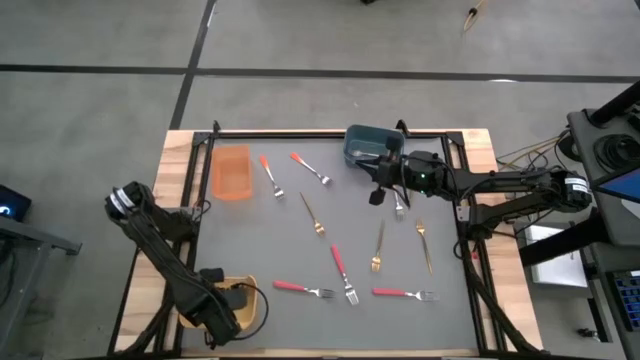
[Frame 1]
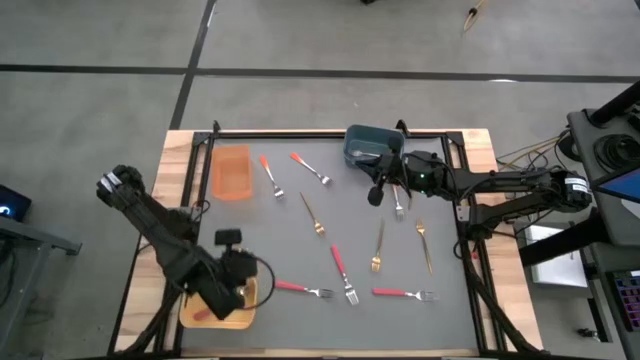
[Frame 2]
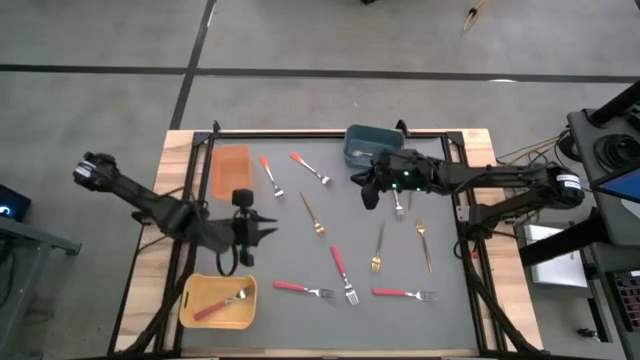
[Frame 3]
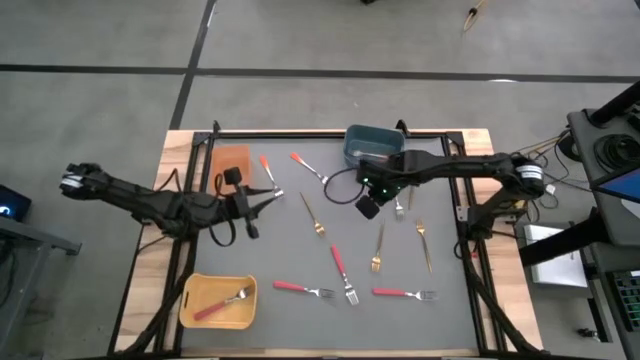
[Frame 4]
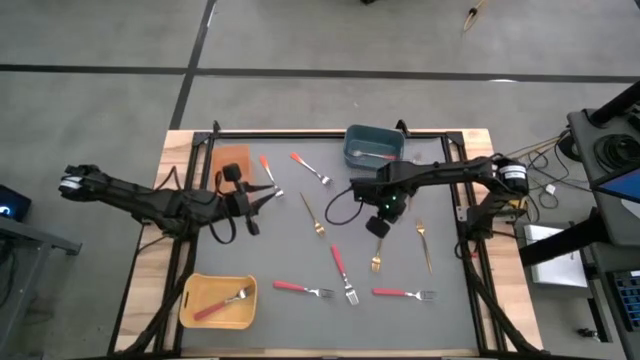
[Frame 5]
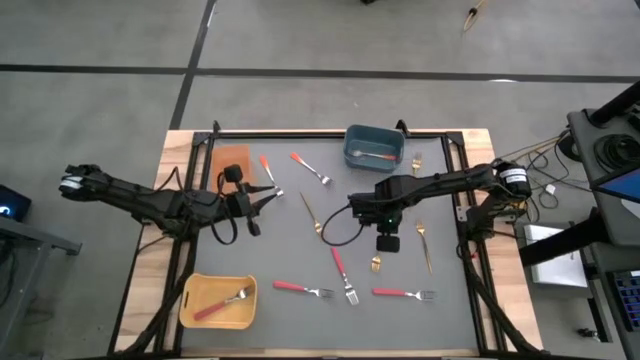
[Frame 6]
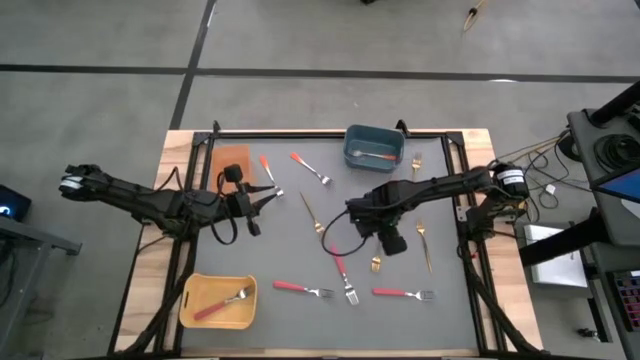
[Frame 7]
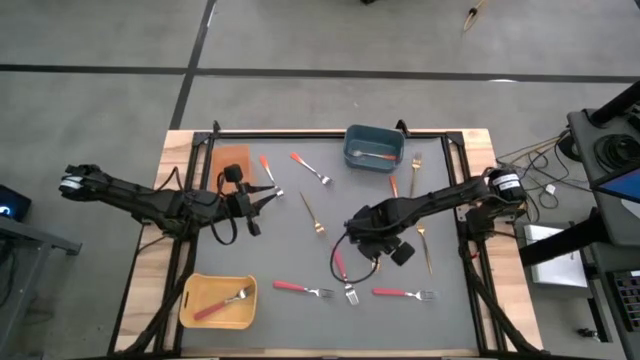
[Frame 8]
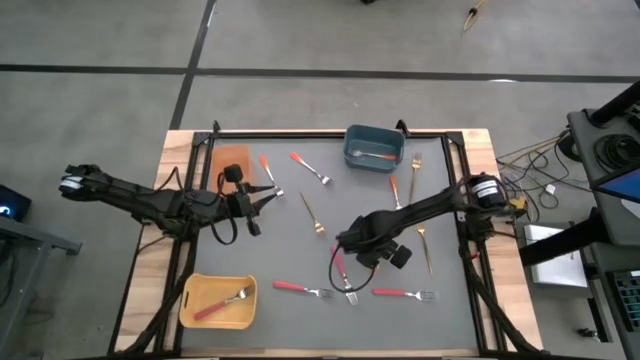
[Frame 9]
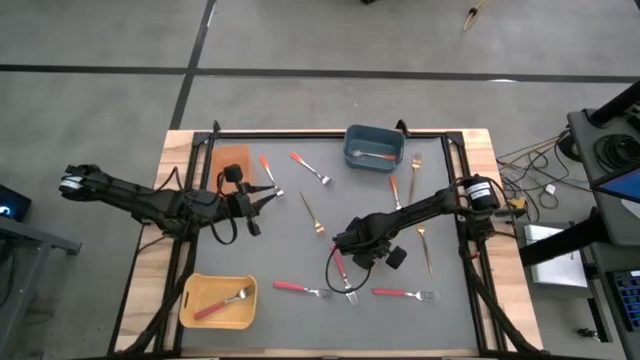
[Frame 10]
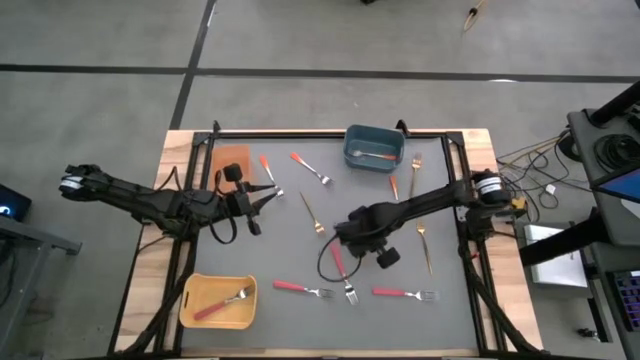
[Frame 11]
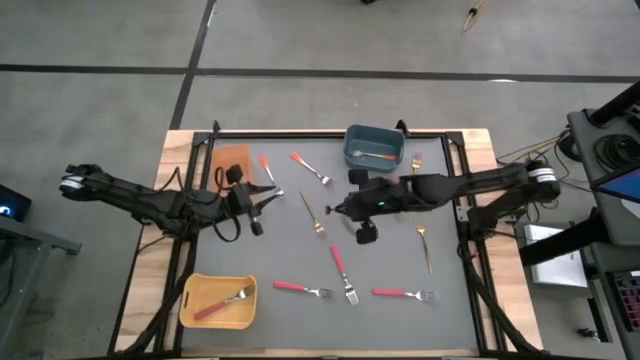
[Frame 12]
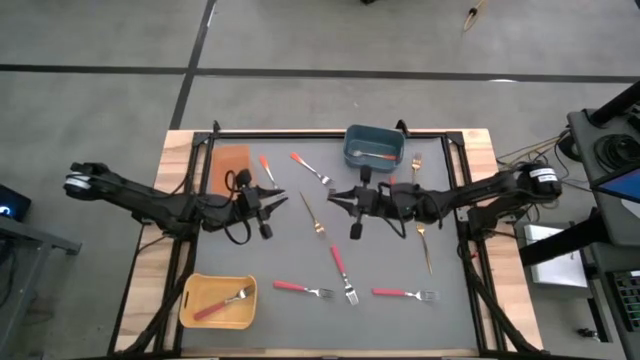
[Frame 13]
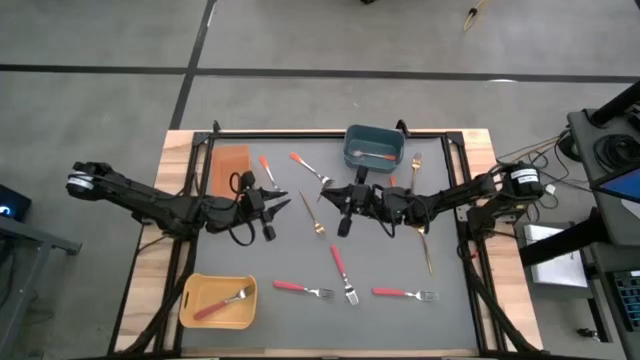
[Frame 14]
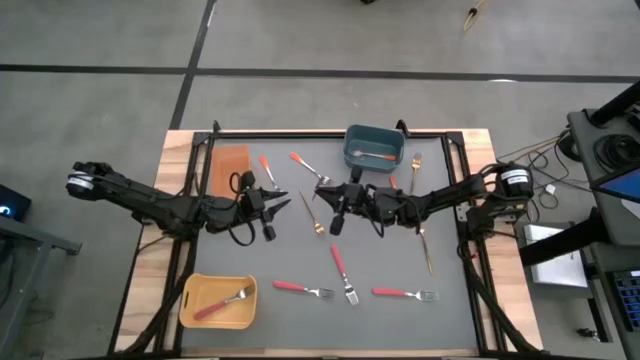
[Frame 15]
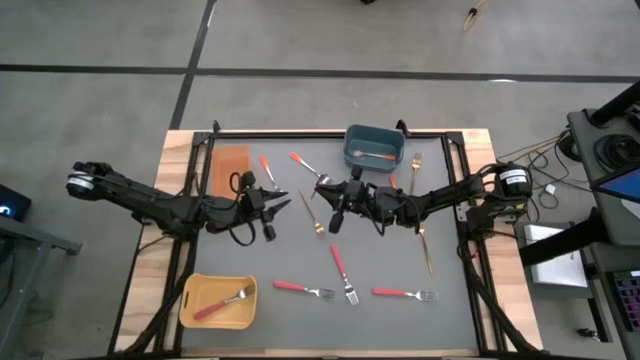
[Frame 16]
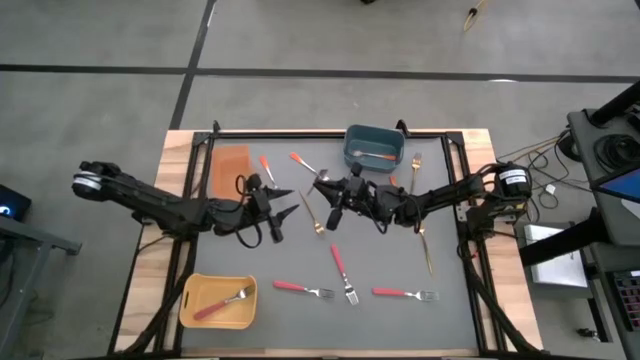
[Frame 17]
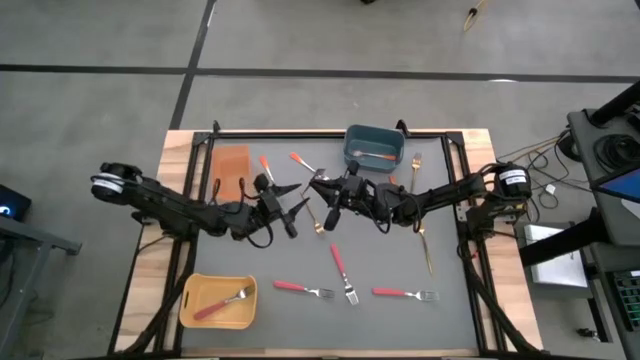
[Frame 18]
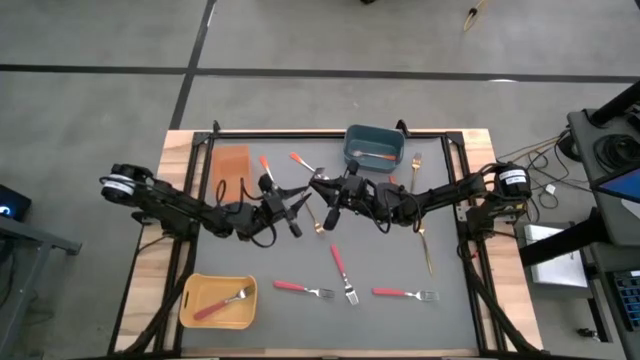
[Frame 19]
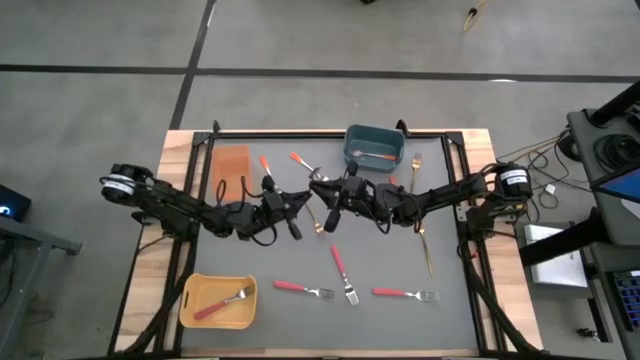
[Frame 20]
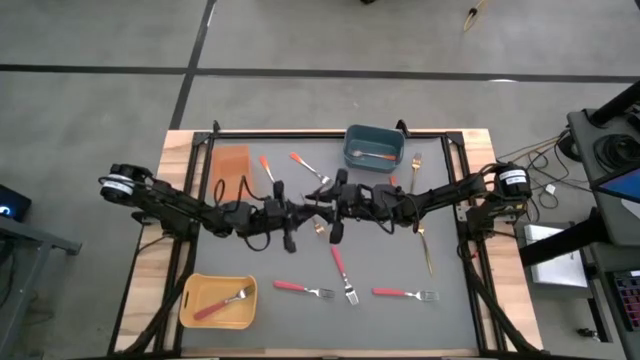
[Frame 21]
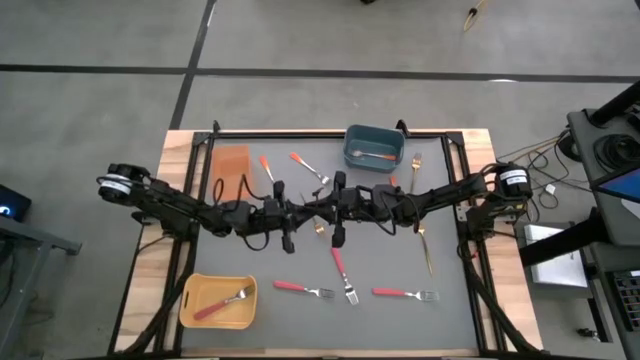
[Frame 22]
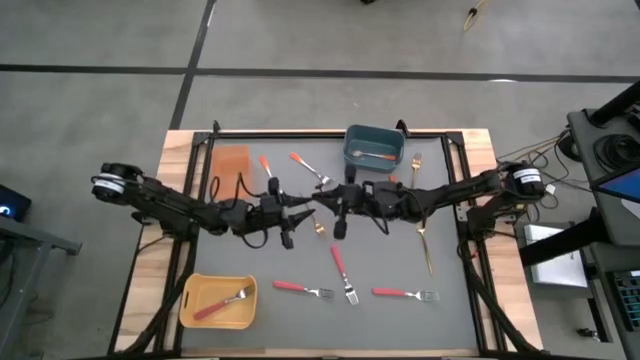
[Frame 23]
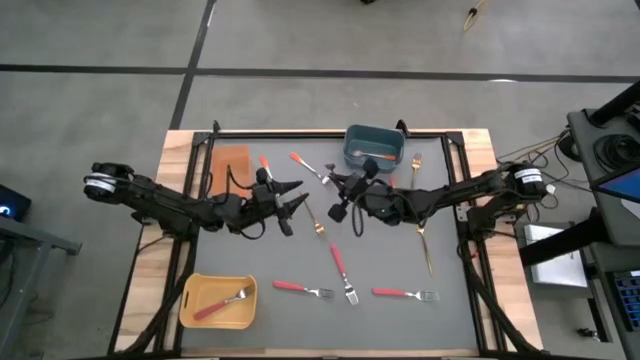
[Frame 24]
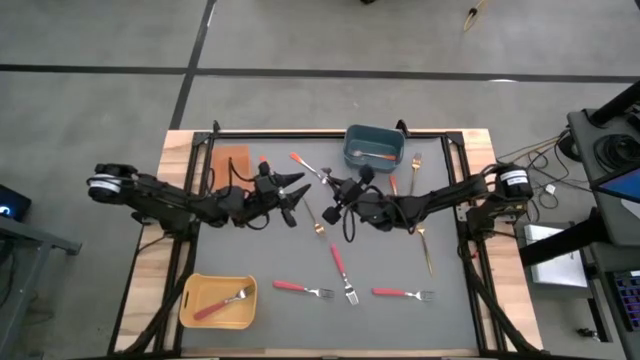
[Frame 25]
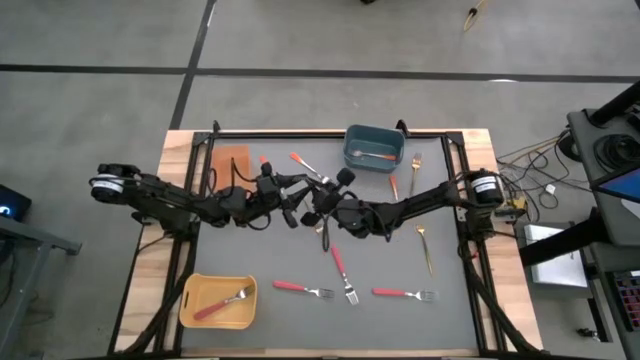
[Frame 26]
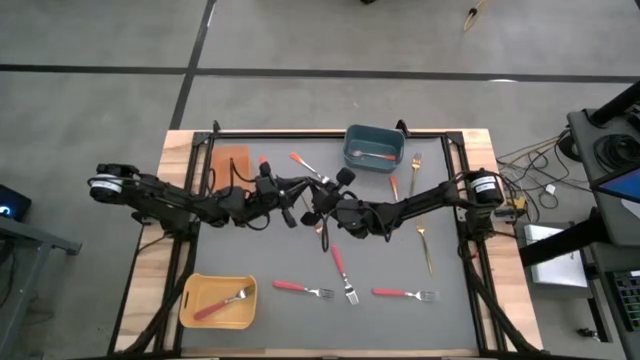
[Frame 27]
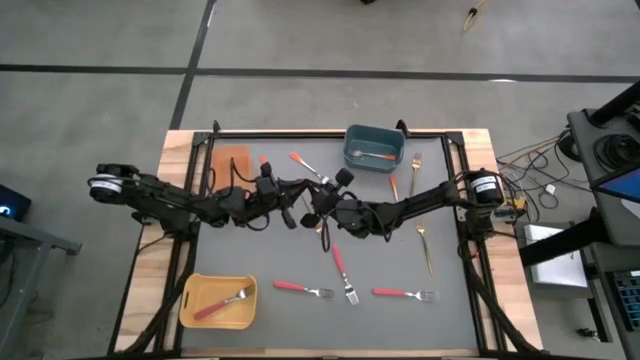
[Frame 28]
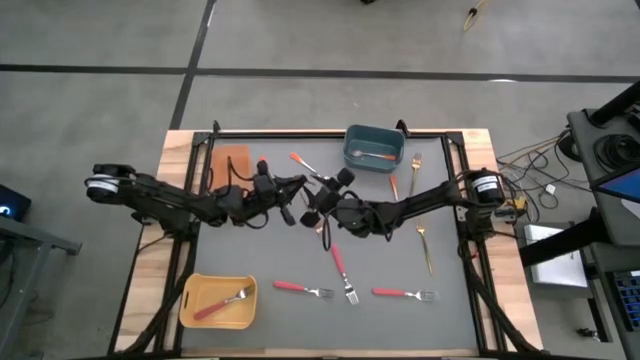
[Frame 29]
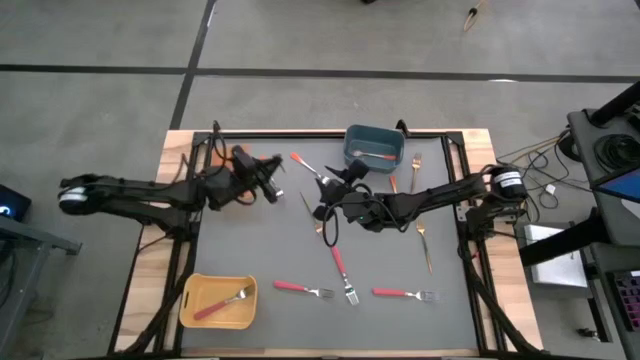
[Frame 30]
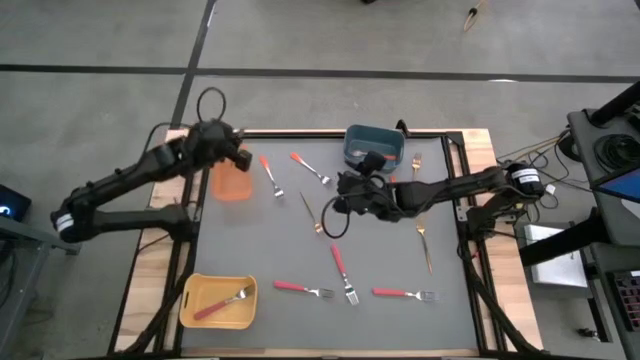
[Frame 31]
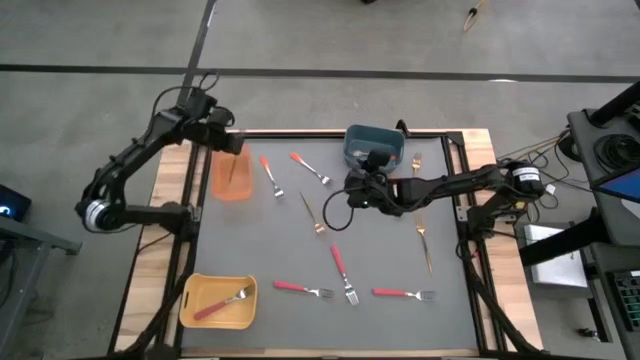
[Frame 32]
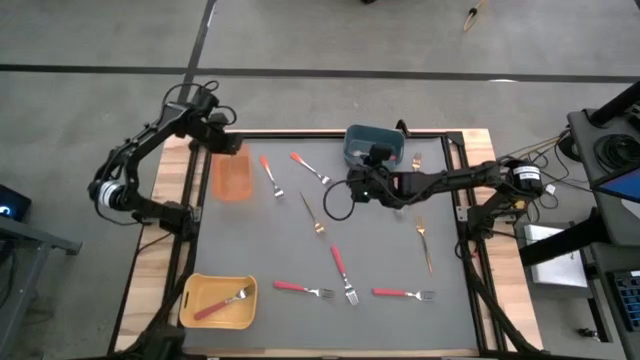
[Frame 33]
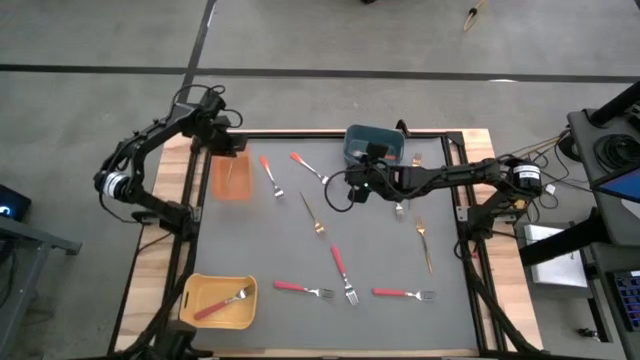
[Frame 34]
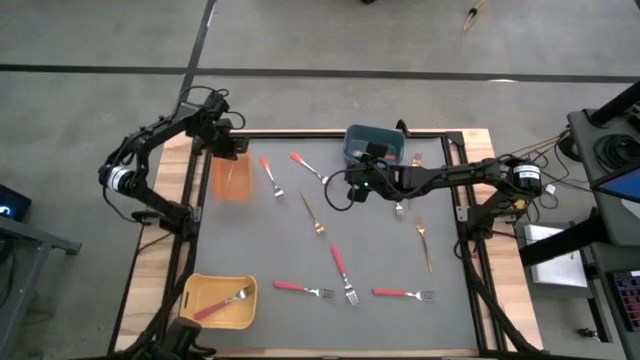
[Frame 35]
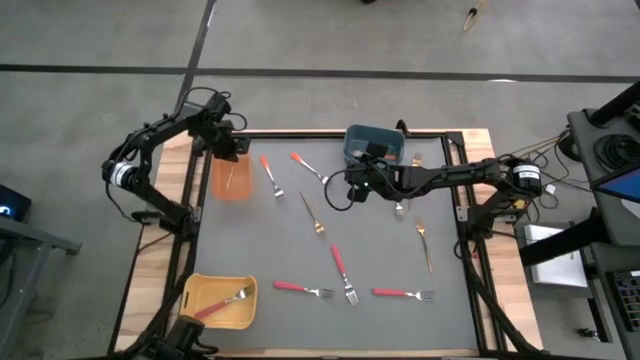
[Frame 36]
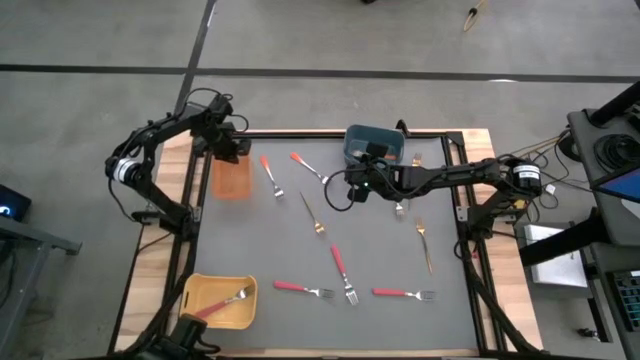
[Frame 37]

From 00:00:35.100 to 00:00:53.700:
Task: Sort silverware by color (type)
Put the gold fork into the orange bin

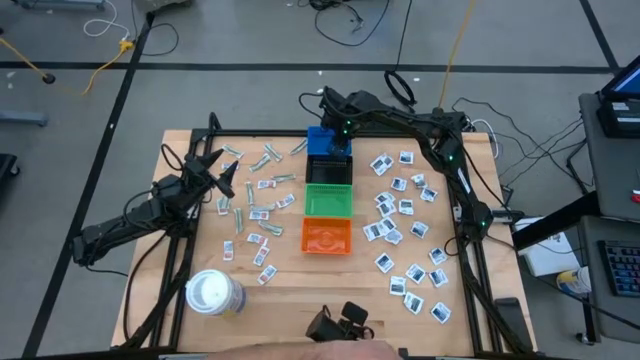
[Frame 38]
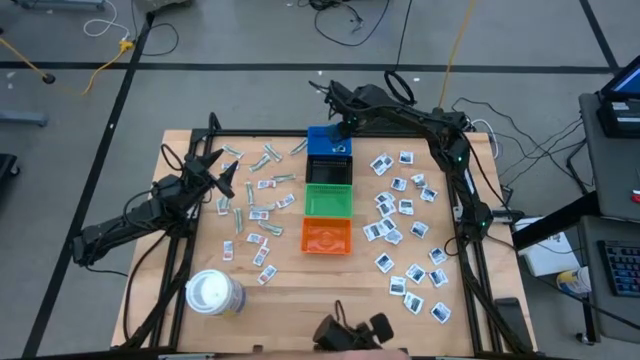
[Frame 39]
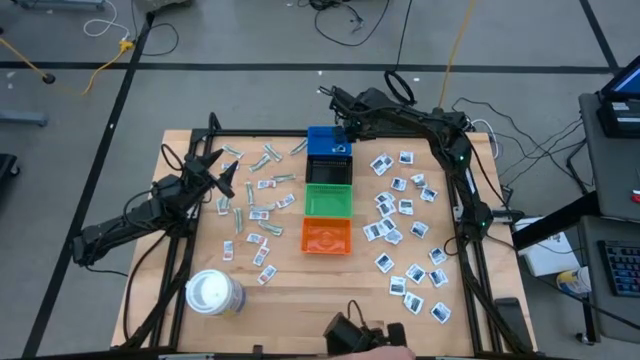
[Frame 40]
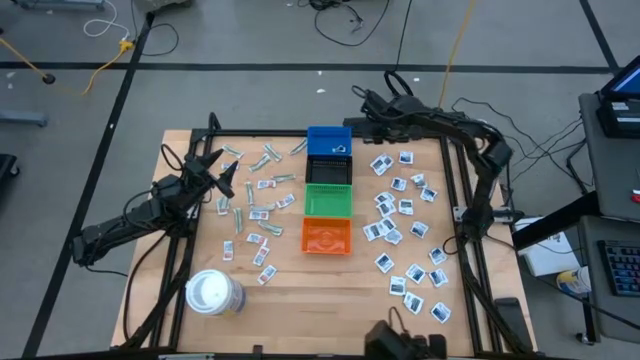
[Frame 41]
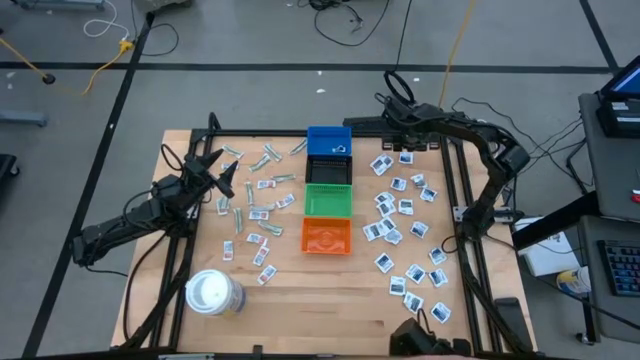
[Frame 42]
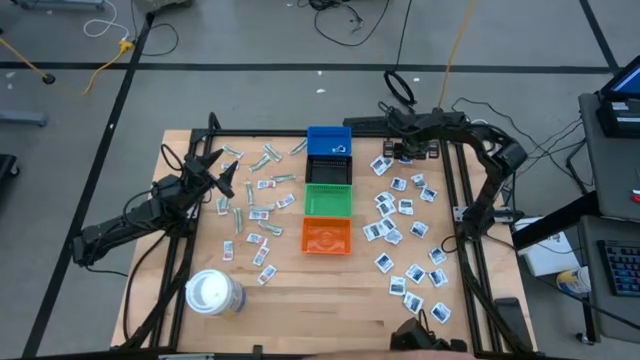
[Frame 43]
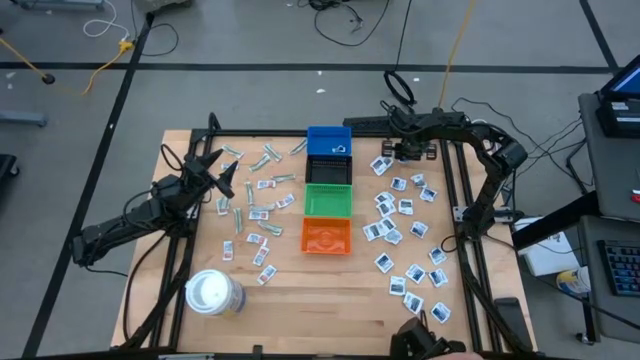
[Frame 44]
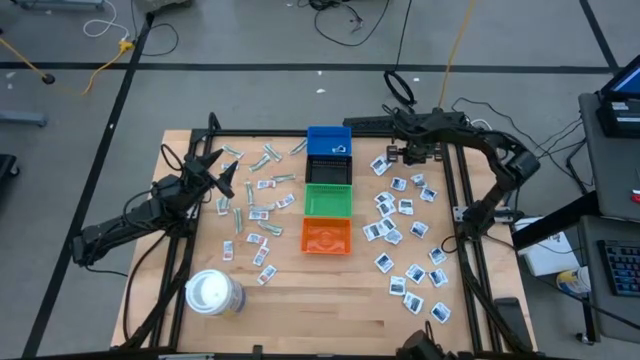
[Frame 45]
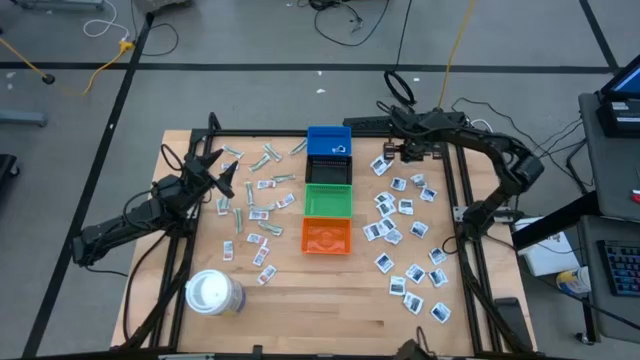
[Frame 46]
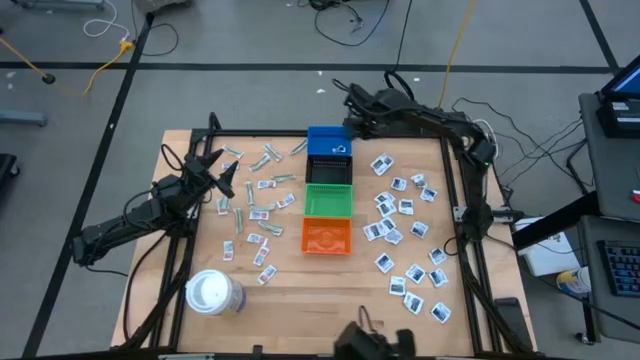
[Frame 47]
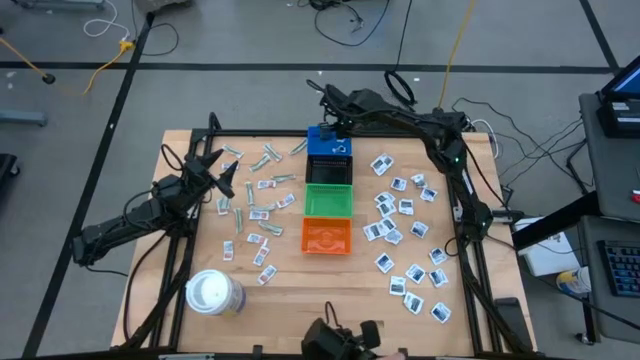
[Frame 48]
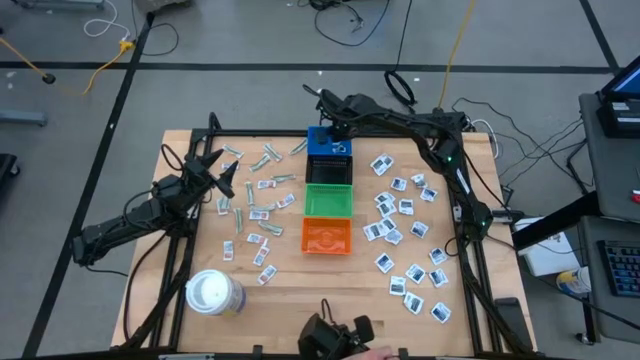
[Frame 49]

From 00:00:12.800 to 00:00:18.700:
Task: Pick & Place First Aid Supplies
Put the blue alcohol pad into the blue bin
